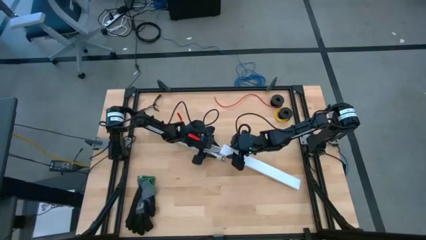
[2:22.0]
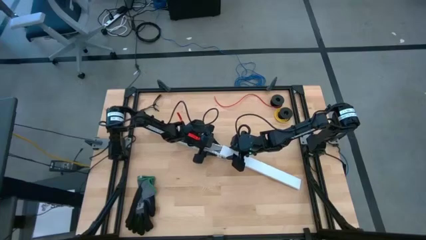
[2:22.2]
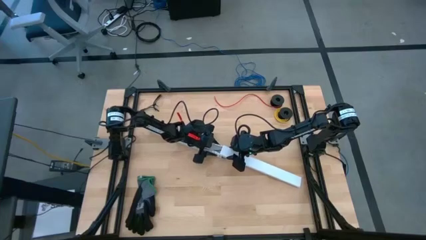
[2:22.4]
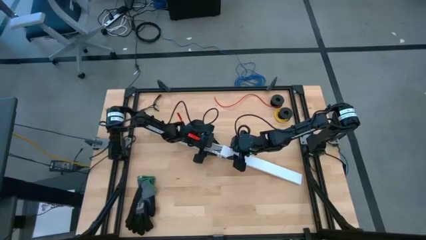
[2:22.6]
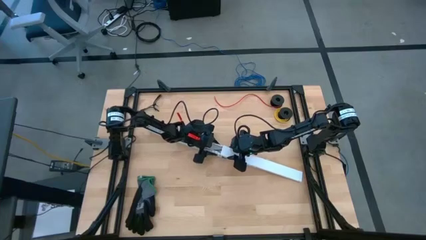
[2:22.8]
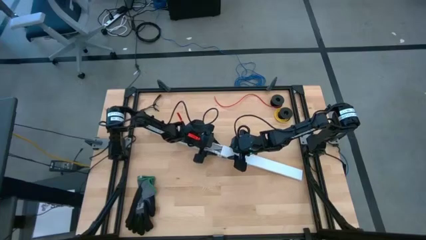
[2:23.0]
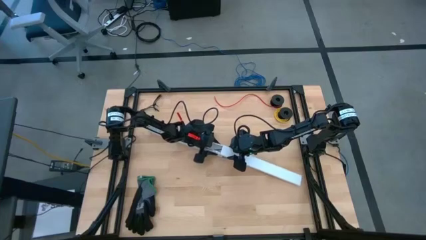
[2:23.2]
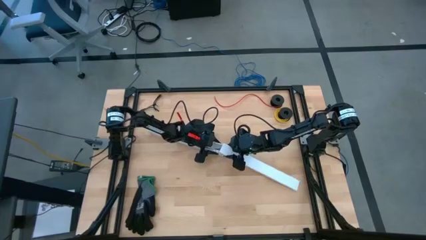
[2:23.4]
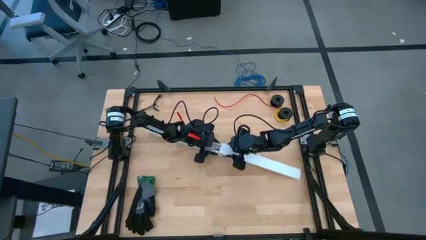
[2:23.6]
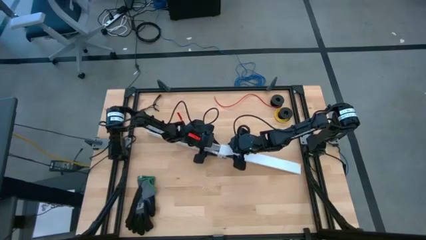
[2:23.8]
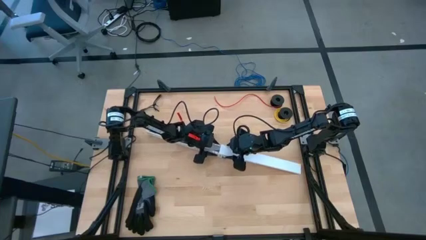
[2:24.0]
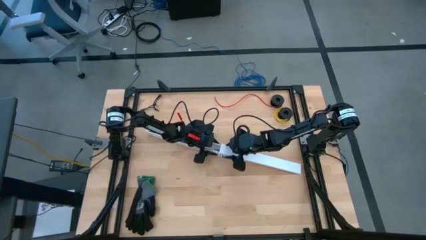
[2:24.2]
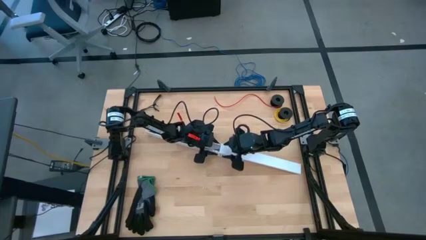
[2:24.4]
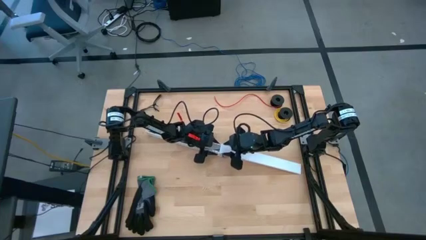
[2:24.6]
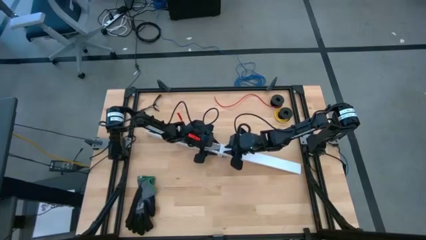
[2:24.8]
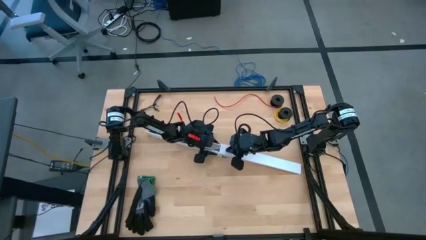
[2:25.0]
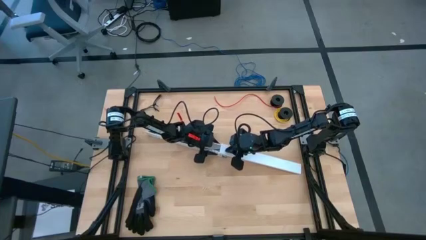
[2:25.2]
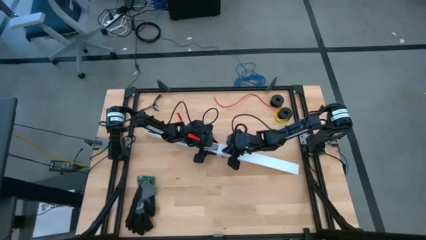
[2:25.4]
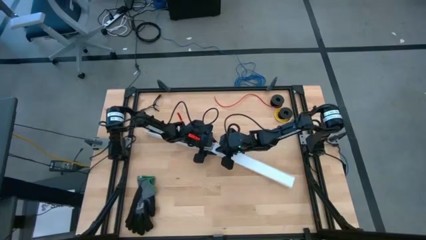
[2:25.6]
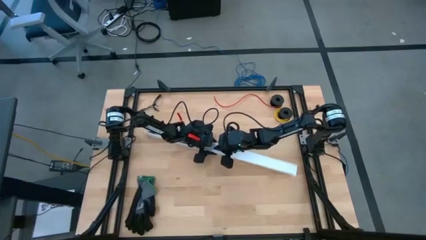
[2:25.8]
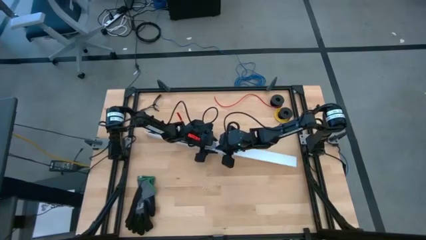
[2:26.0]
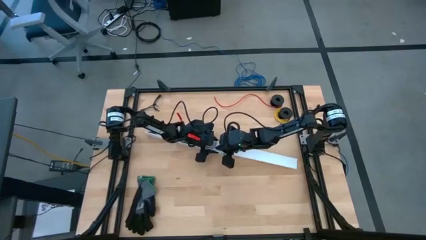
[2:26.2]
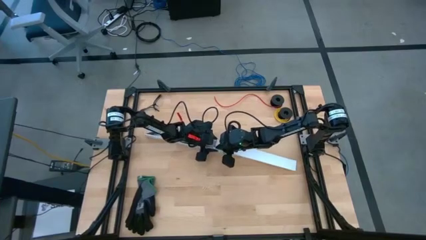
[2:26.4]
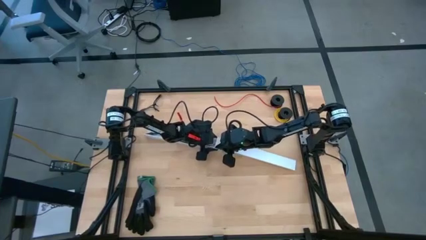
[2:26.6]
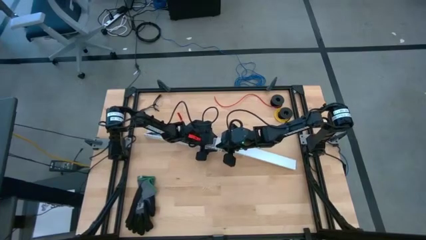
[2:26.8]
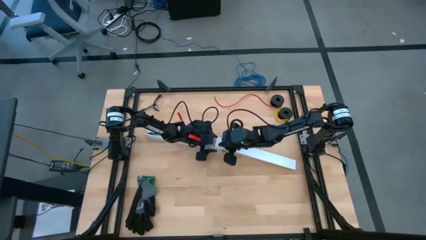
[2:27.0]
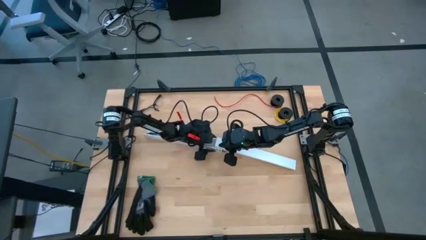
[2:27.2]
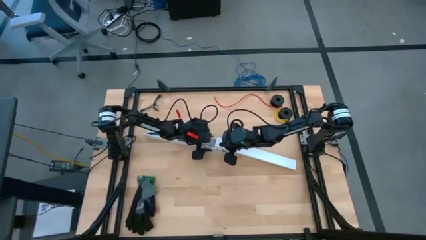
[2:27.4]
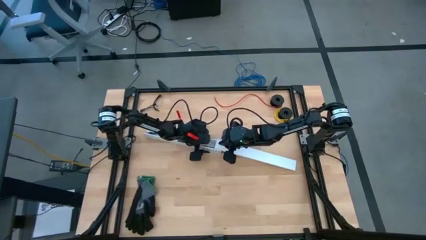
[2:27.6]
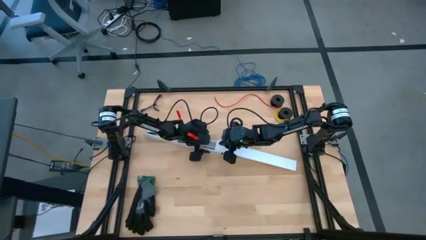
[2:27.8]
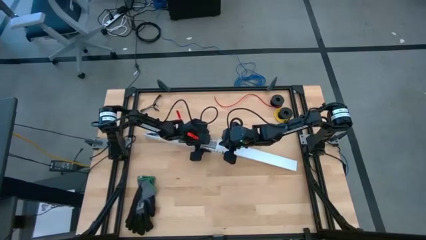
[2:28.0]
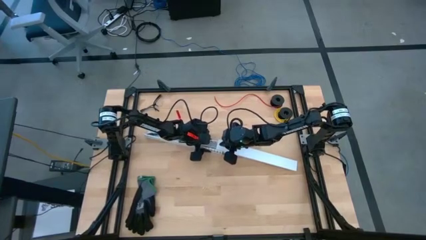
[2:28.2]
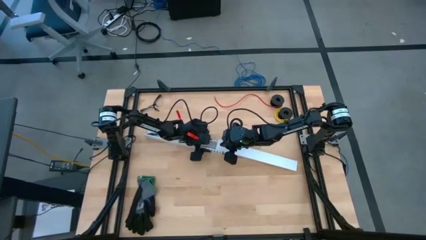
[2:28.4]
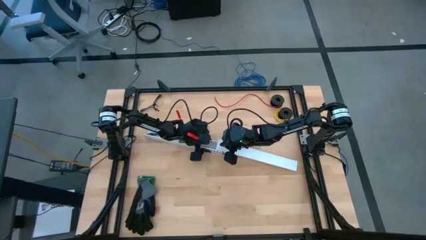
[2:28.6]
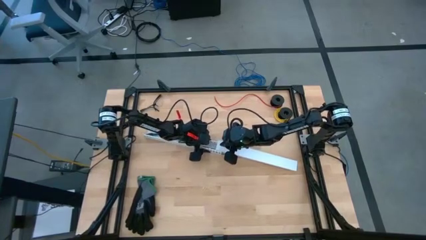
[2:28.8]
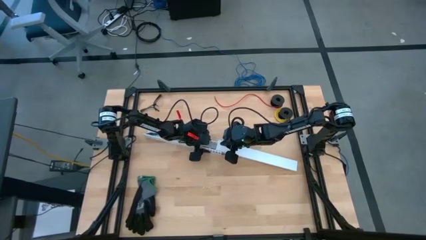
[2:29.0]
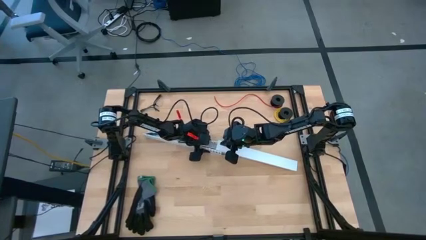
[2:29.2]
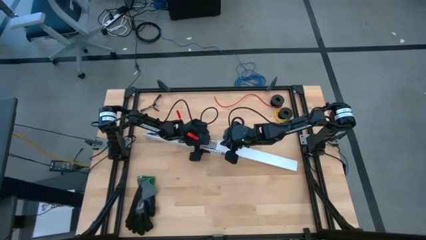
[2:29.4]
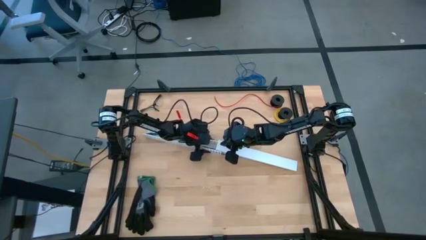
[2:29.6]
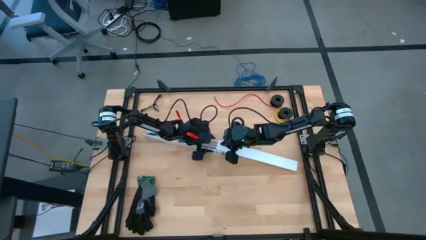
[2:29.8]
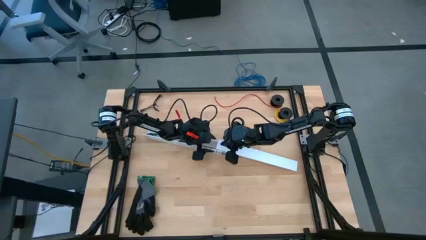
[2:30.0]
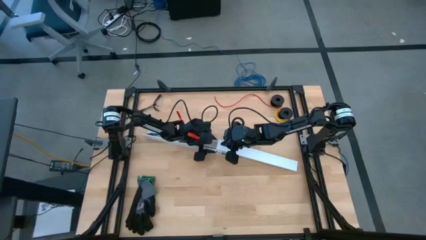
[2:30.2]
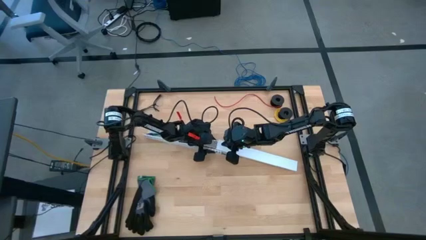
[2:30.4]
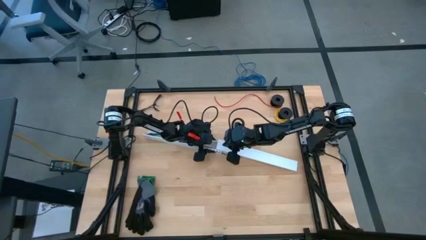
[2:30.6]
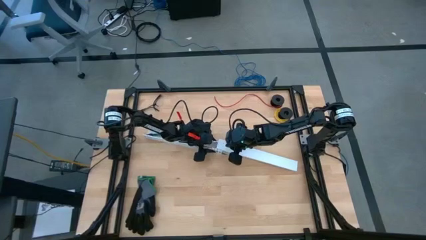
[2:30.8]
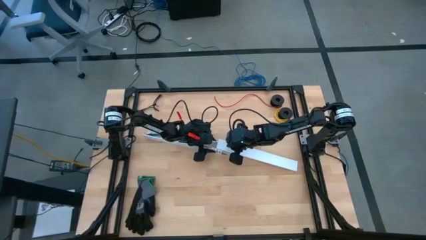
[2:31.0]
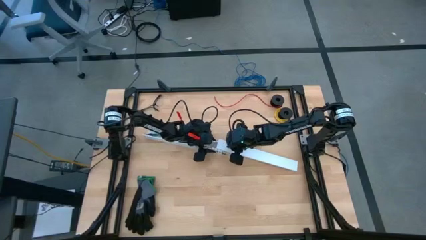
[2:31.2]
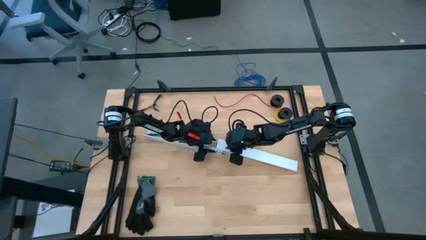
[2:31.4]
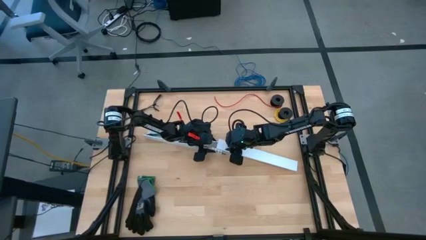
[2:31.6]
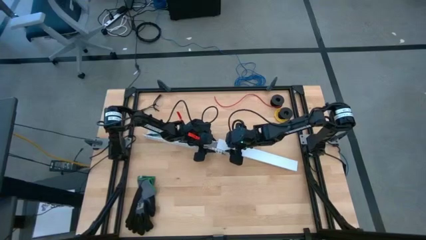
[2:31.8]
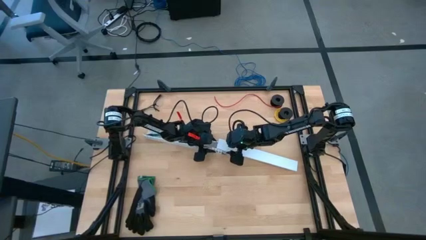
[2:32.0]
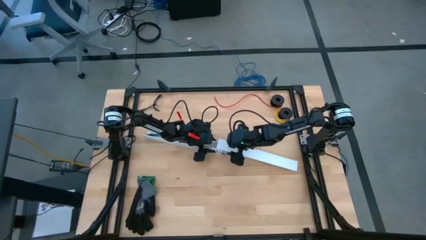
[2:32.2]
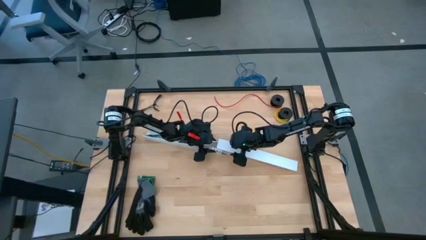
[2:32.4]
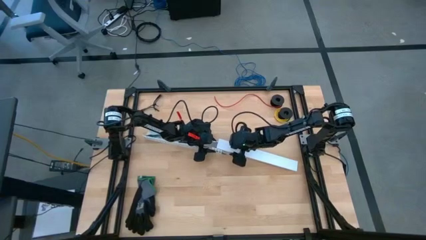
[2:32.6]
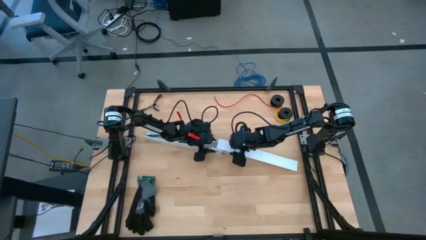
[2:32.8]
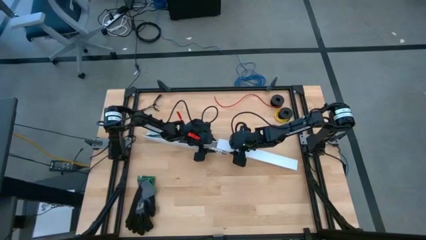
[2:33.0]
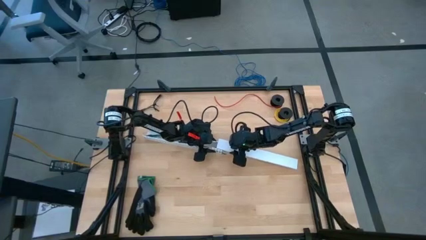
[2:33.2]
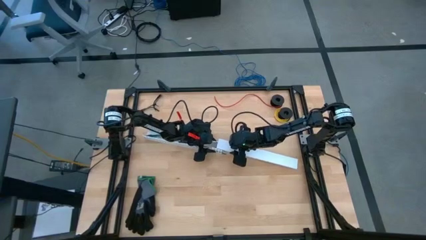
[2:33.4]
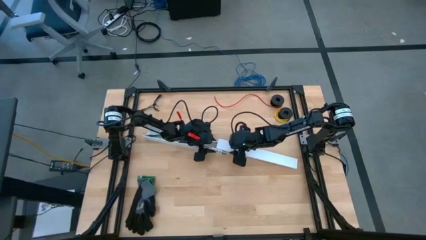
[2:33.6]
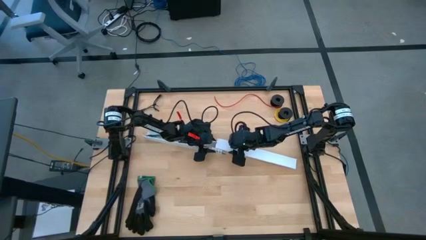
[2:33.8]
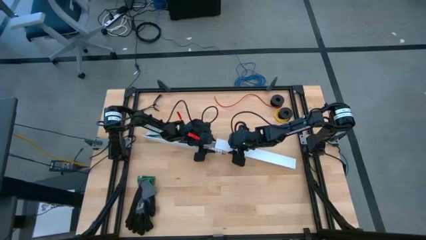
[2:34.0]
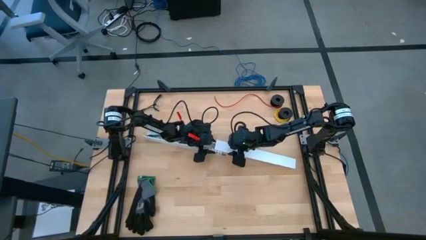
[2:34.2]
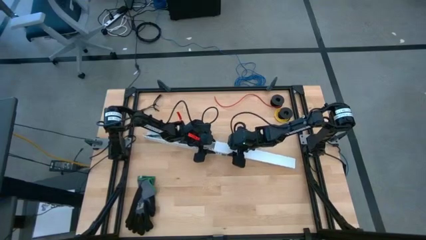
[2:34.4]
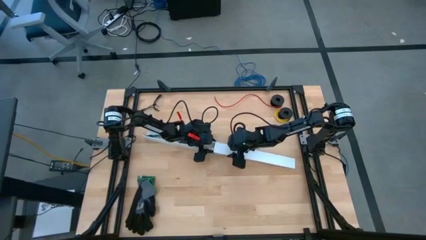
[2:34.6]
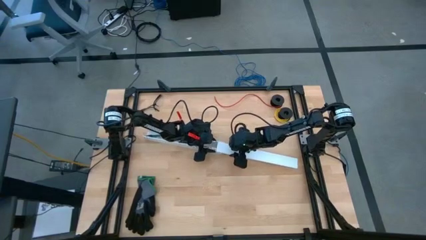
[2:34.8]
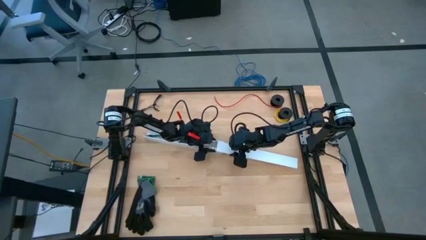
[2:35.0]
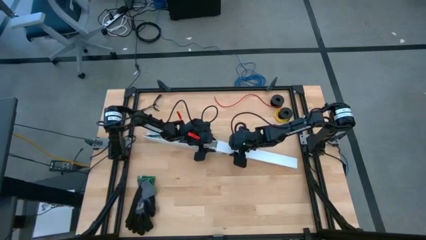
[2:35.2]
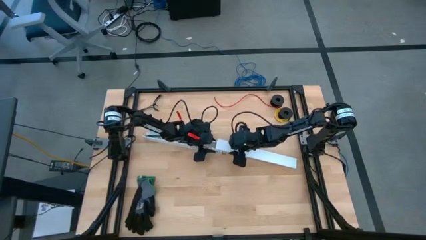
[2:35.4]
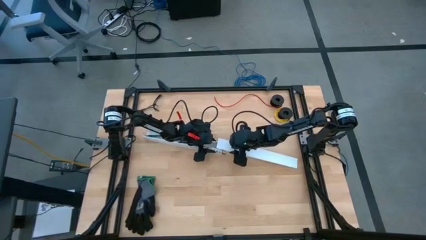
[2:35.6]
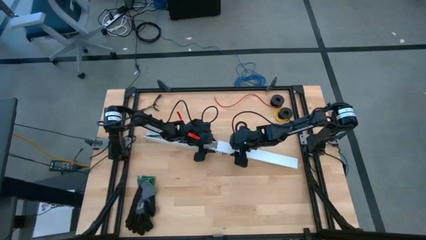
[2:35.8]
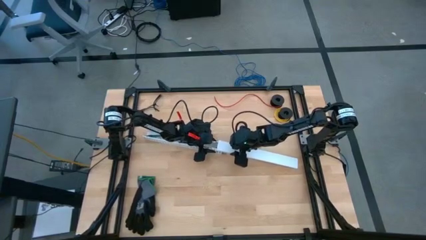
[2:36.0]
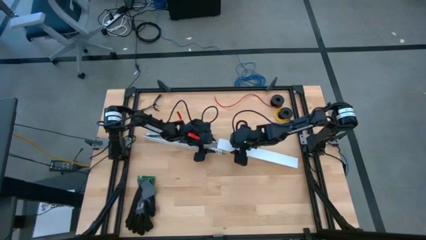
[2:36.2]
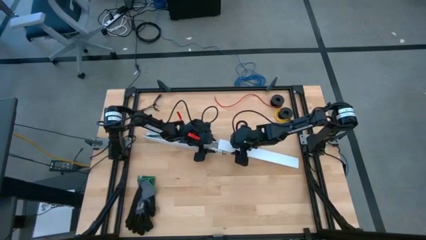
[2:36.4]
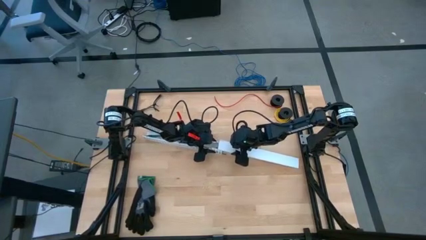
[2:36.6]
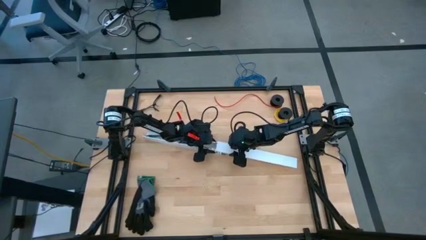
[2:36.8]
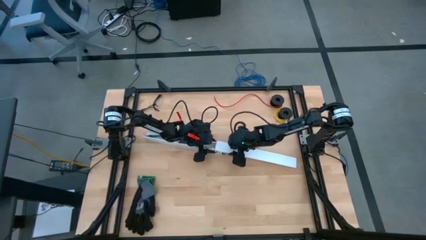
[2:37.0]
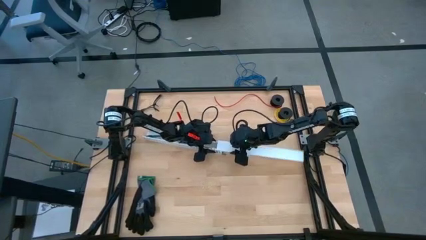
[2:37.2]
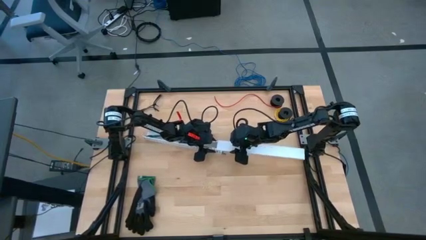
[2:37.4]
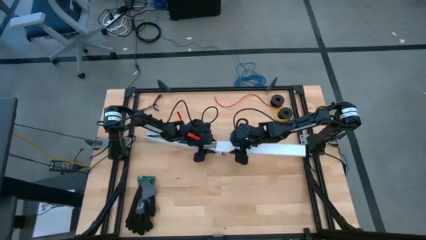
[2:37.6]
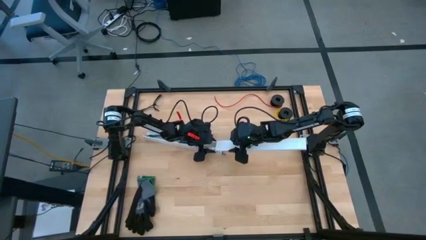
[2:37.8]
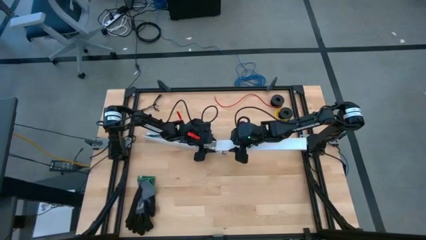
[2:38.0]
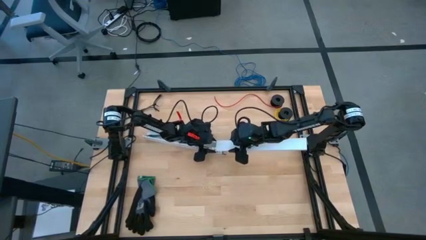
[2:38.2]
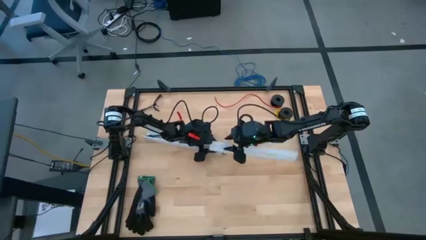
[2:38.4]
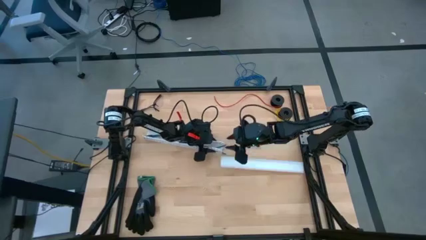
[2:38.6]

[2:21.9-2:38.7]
Task: Ziptie cables
Close the white cable duct
